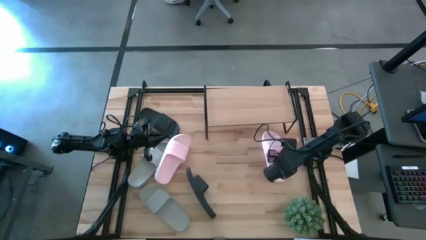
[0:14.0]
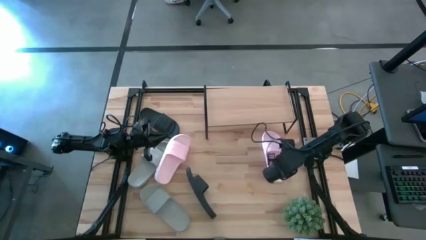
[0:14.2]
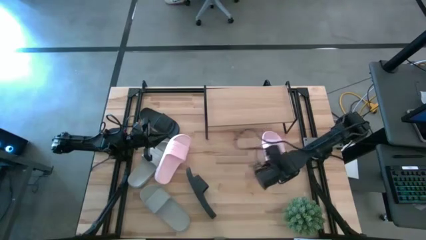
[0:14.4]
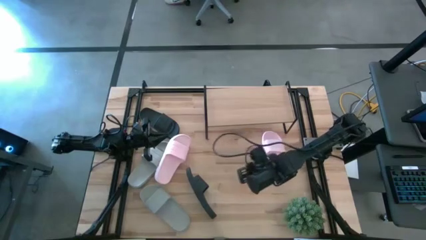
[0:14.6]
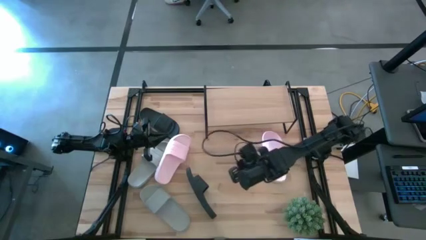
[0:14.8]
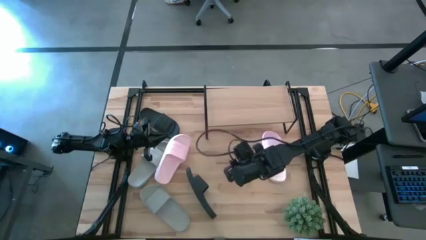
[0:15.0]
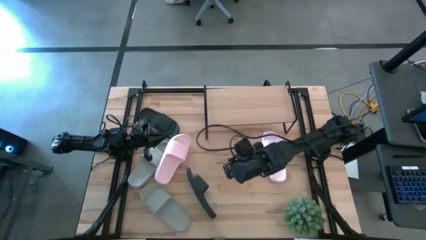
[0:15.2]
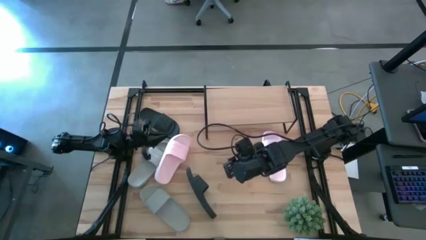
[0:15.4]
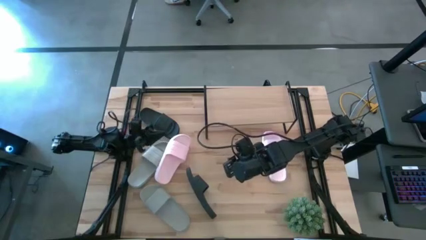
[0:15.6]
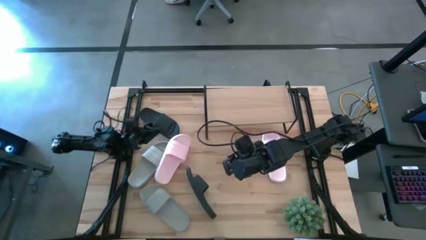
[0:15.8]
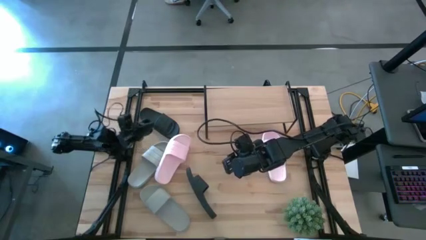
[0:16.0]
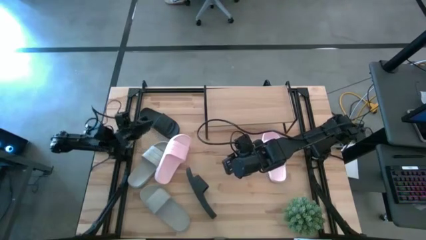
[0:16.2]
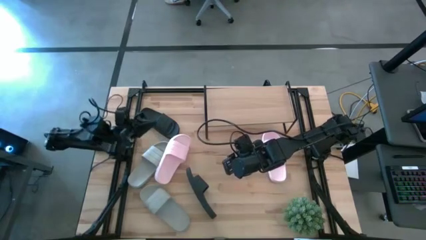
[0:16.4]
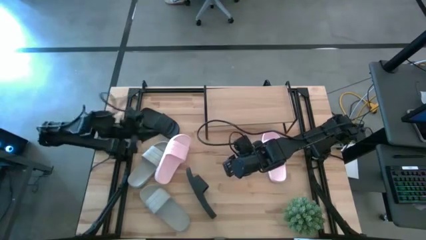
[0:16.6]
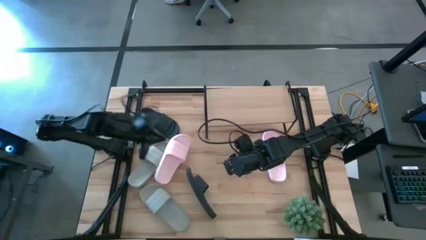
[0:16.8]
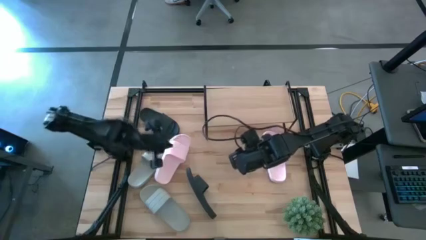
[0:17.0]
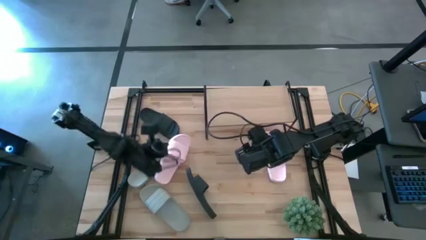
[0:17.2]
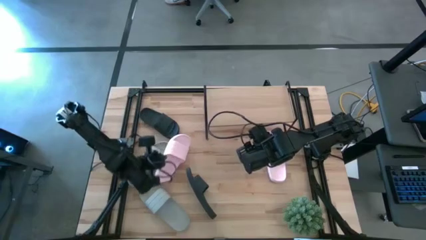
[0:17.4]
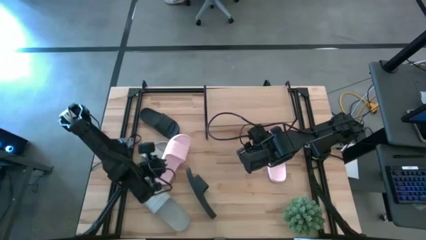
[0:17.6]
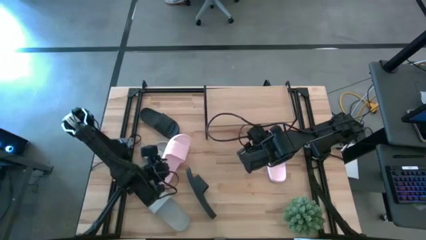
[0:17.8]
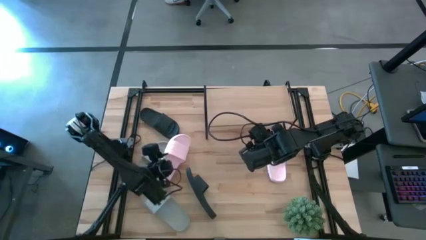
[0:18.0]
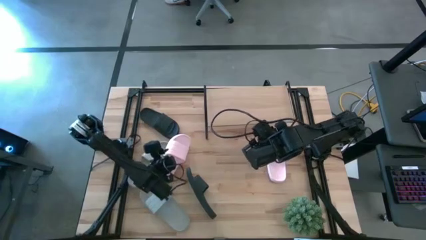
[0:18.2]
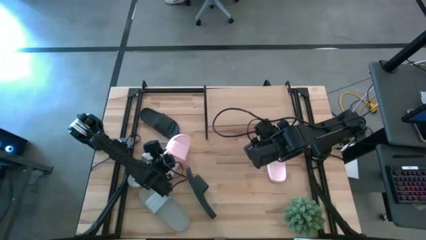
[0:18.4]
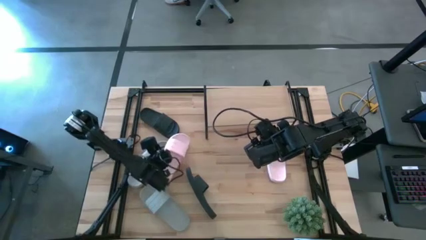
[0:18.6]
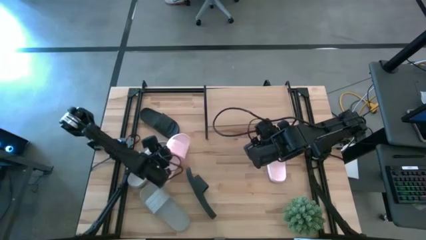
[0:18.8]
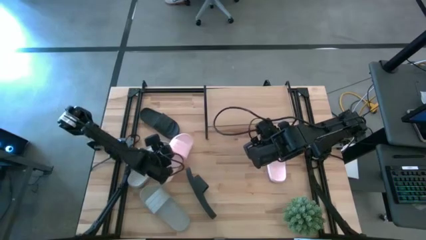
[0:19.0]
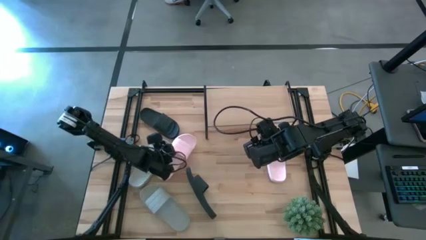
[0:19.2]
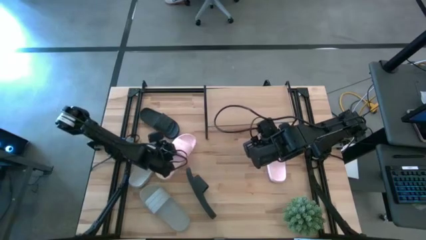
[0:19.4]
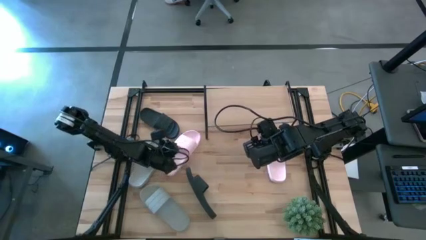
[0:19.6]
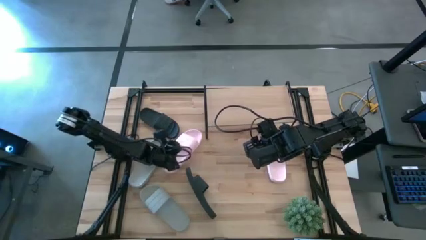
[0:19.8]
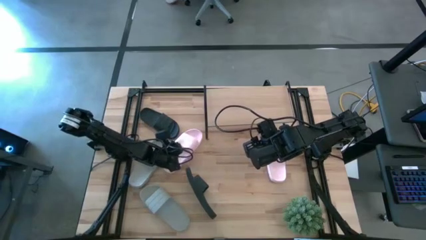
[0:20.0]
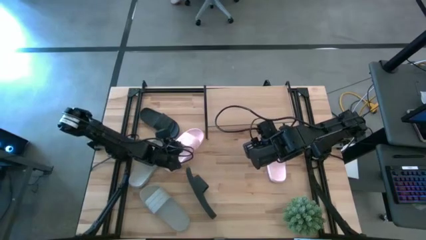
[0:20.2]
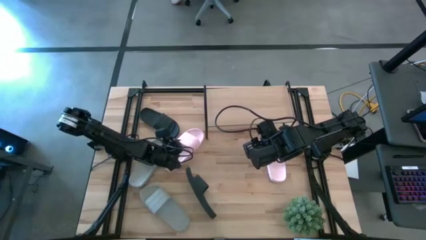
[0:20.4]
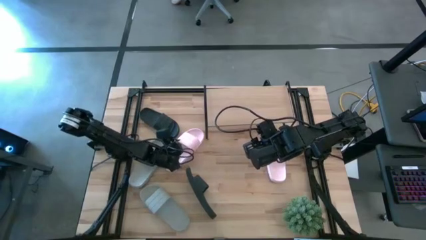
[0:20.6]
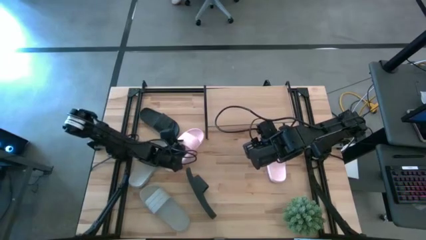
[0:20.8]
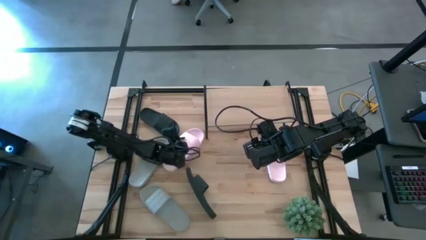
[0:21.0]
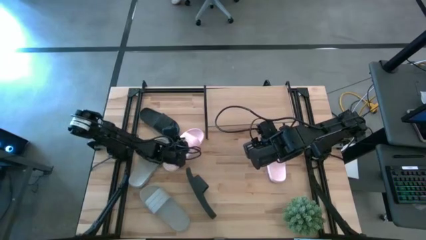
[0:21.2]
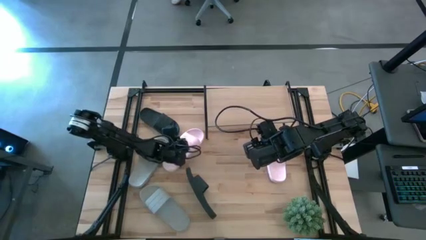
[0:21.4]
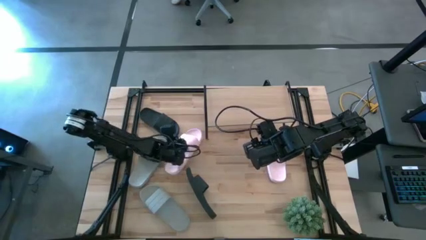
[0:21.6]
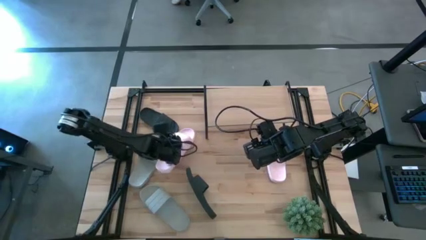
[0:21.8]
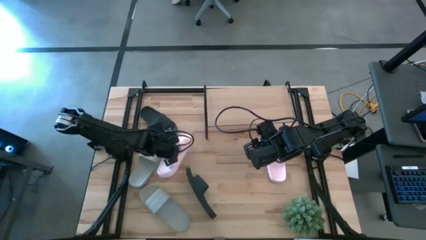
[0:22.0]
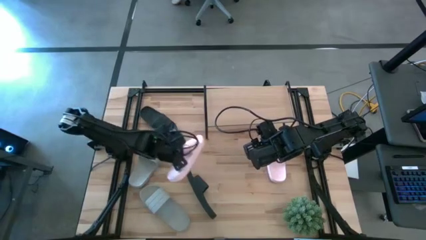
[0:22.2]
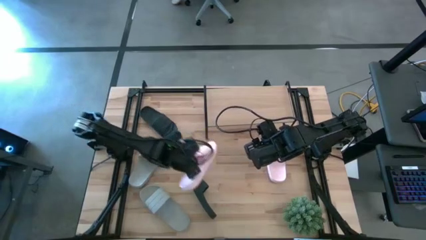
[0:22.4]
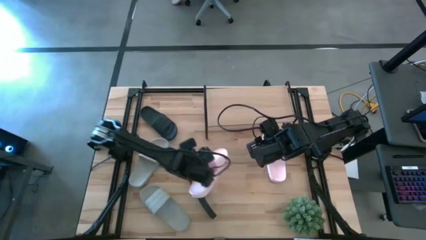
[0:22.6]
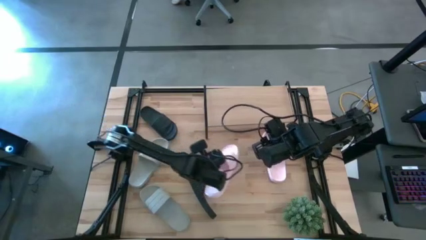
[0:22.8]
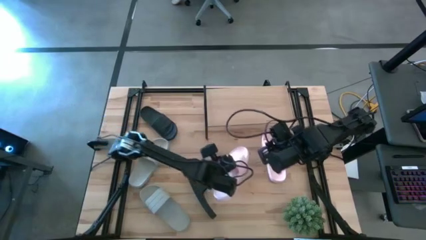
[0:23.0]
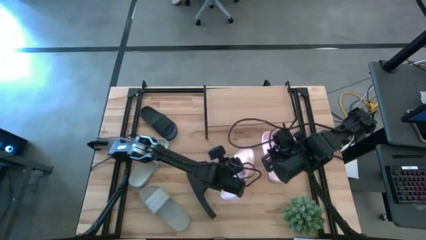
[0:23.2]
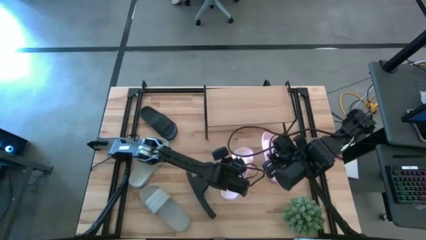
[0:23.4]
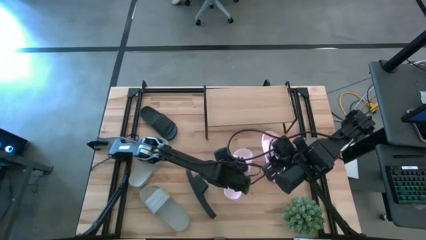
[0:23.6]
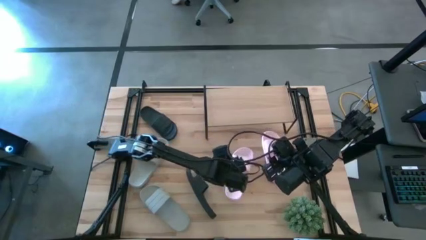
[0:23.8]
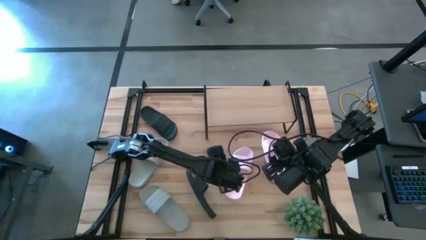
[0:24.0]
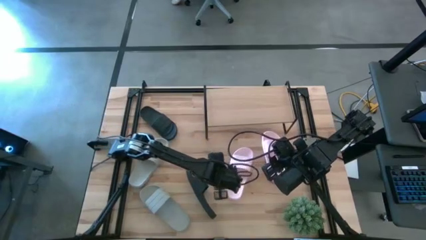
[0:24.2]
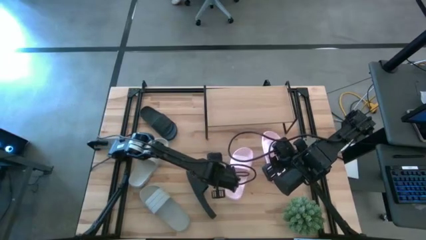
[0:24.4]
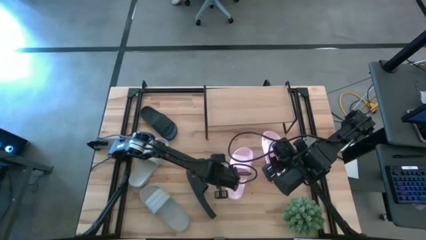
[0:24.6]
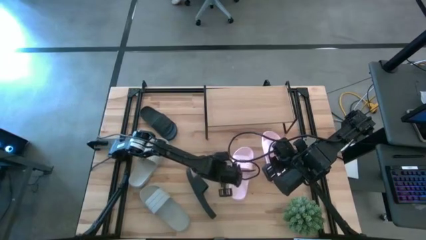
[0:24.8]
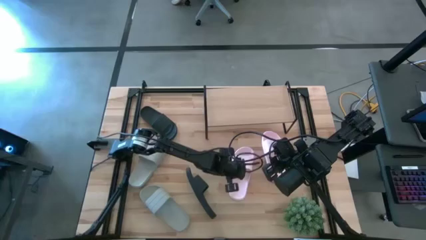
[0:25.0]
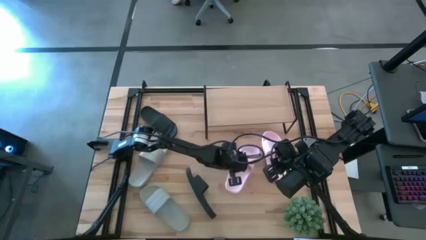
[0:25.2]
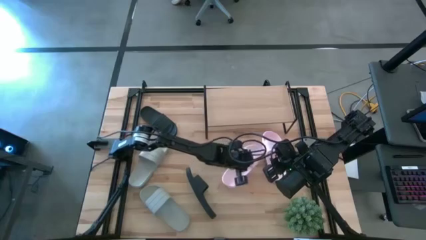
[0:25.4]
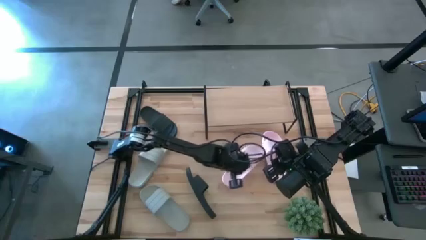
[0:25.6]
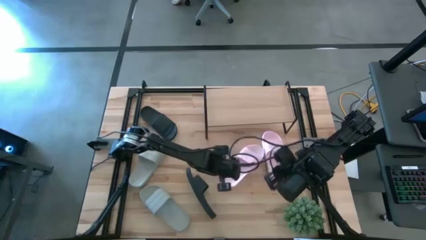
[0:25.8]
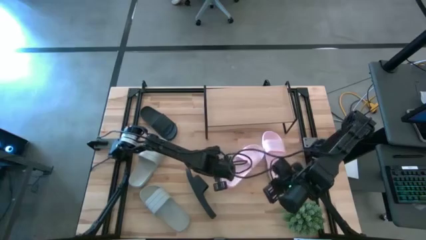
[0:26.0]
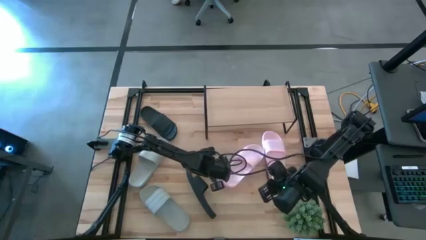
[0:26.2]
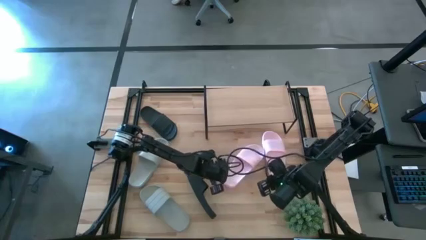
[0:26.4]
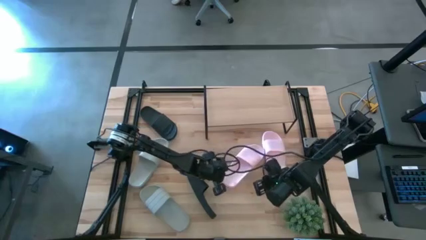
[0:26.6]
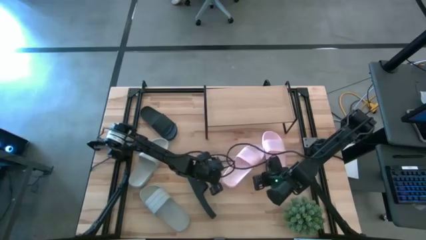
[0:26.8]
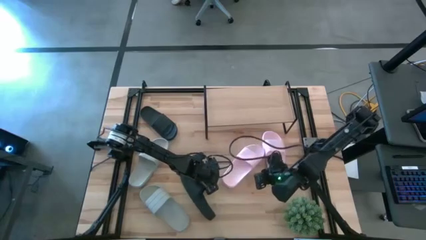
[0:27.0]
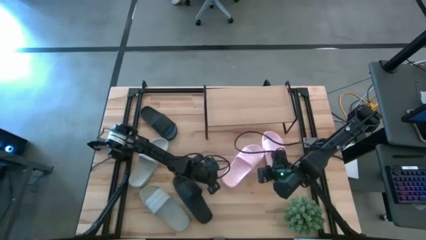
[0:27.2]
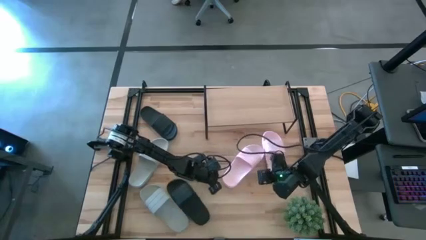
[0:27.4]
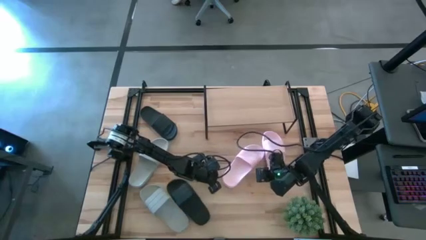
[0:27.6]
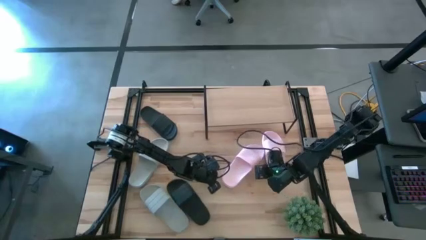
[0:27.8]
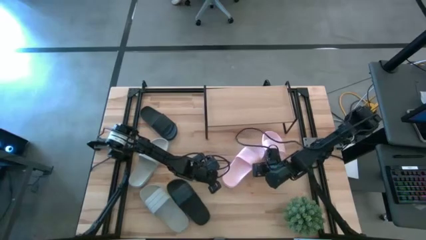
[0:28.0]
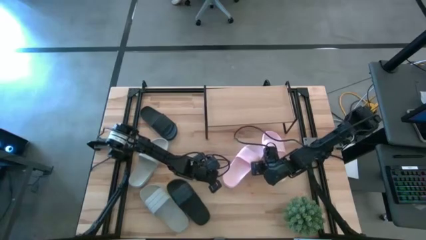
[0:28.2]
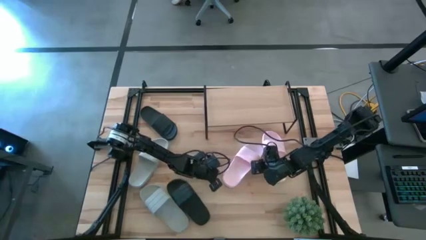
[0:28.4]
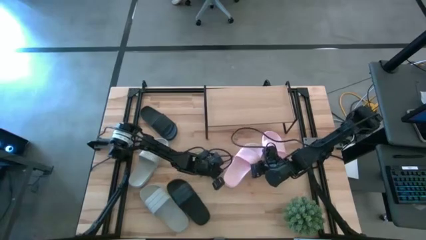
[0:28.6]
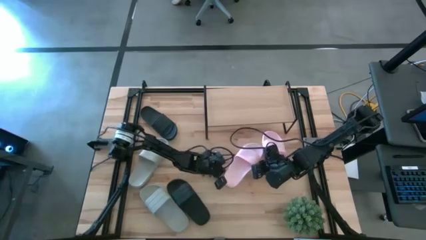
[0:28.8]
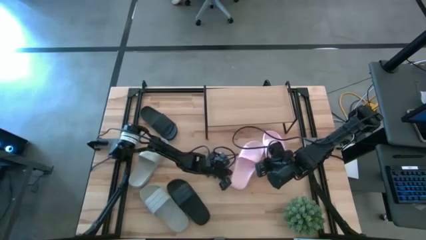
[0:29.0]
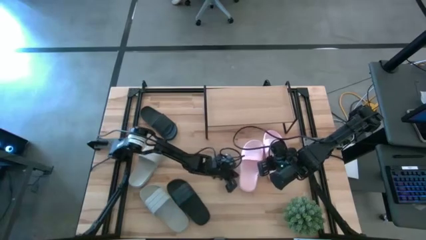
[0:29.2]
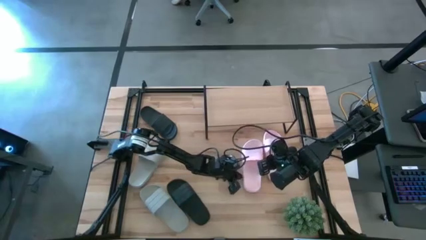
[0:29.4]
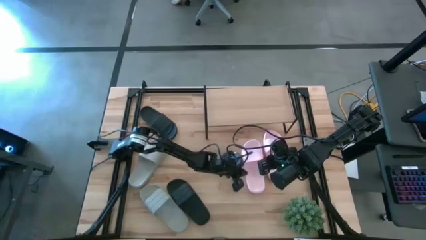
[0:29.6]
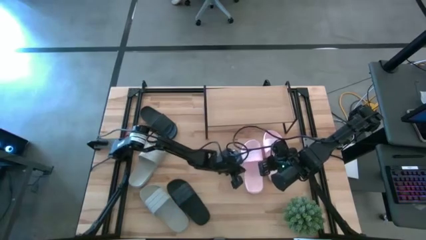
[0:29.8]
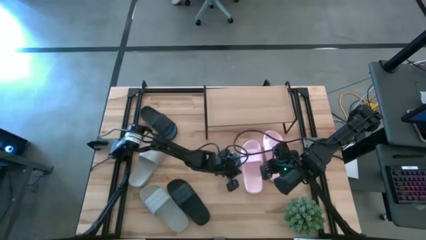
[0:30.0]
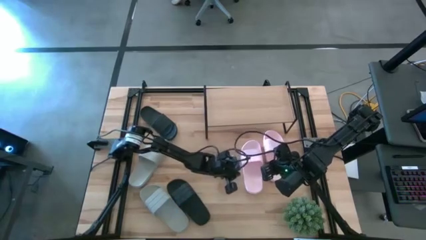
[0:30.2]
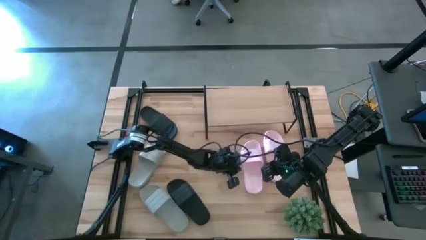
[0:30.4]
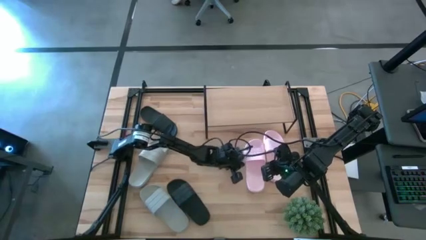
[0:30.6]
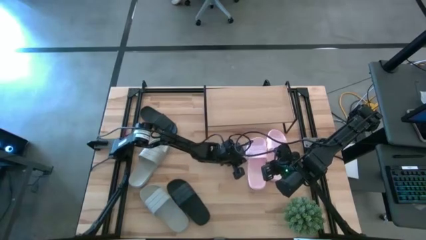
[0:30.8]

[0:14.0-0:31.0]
Task: Pick and place slides into the shelf
Move the left pink slide to the center of the table
